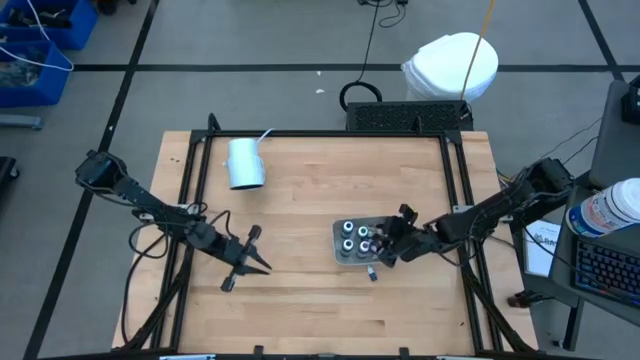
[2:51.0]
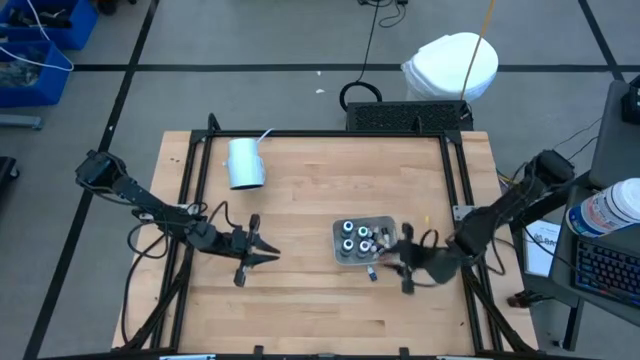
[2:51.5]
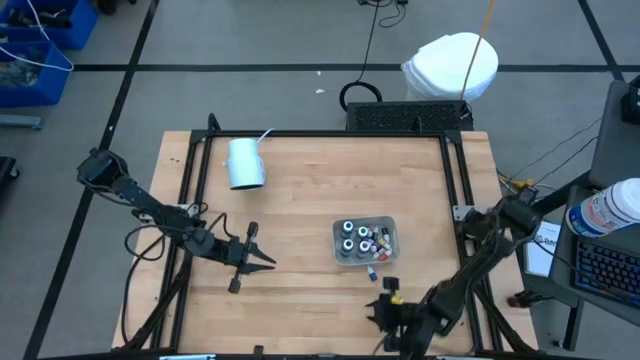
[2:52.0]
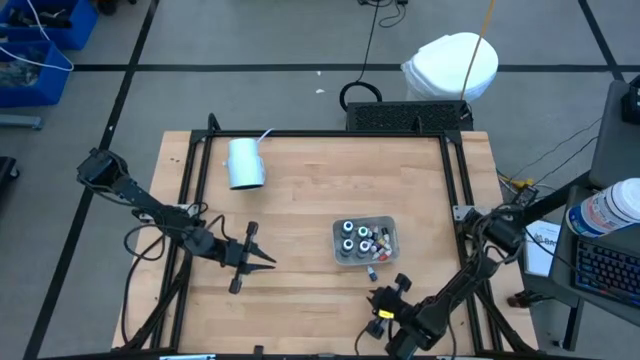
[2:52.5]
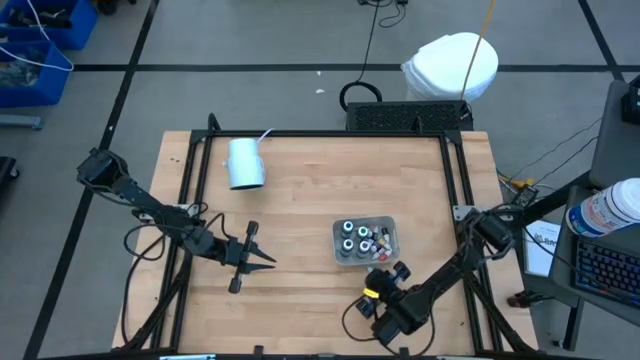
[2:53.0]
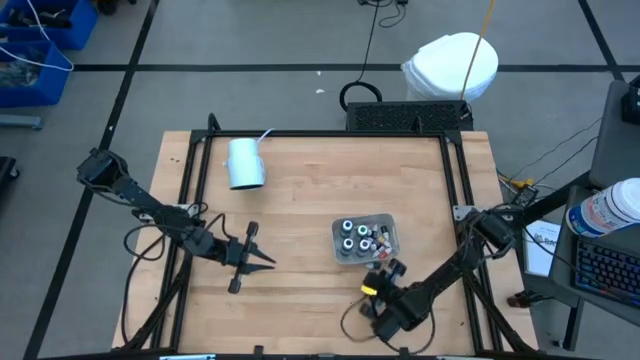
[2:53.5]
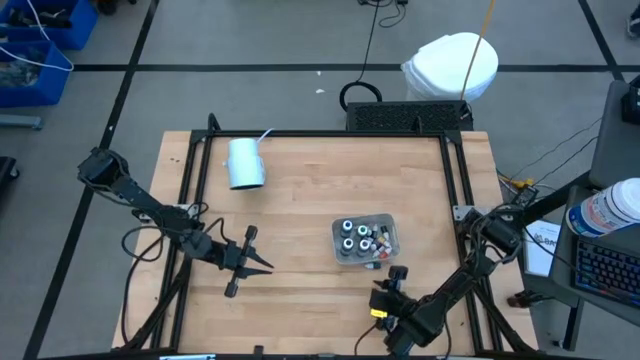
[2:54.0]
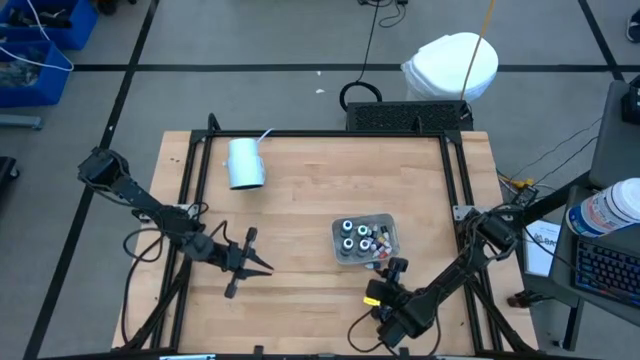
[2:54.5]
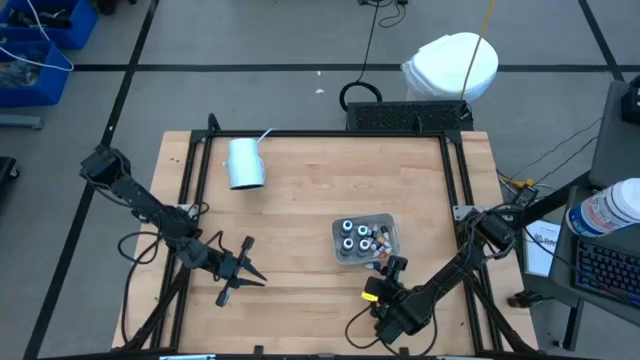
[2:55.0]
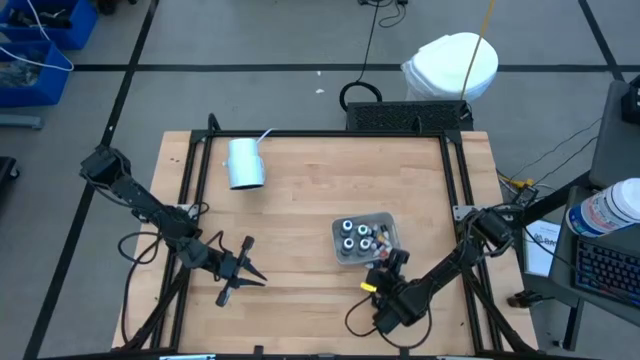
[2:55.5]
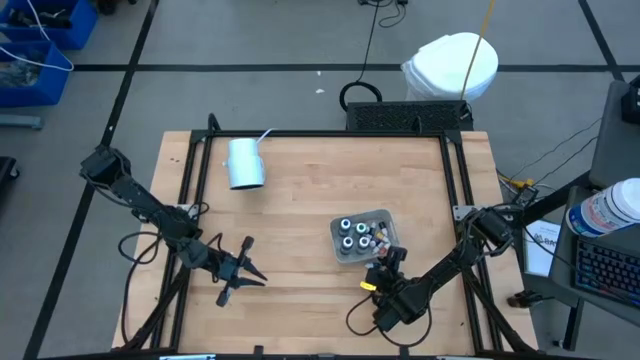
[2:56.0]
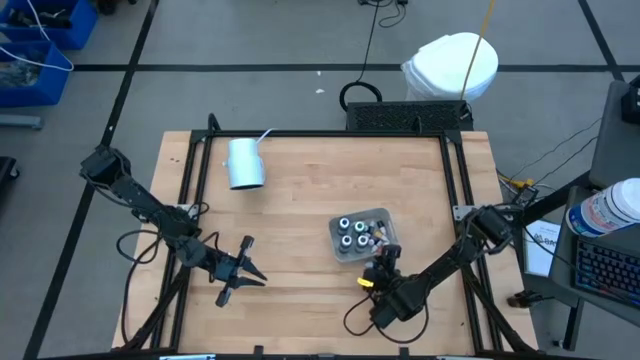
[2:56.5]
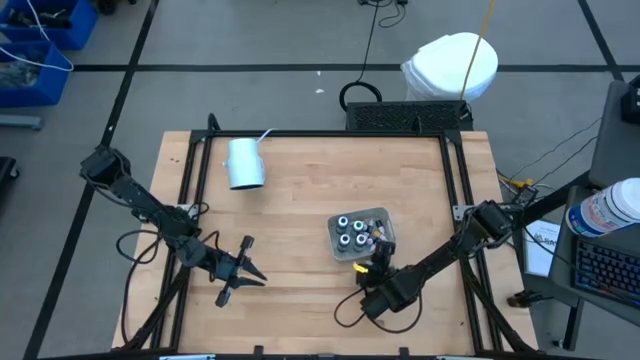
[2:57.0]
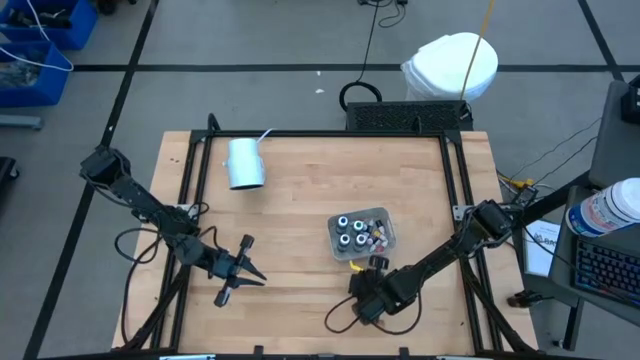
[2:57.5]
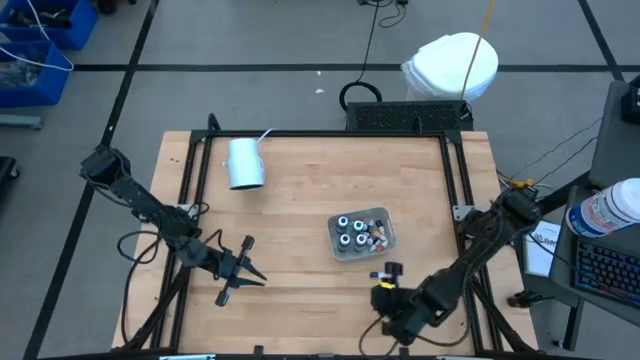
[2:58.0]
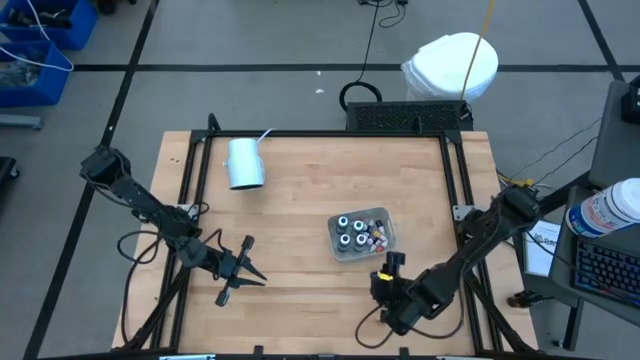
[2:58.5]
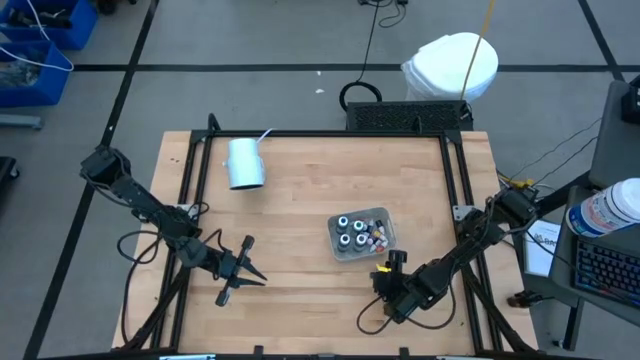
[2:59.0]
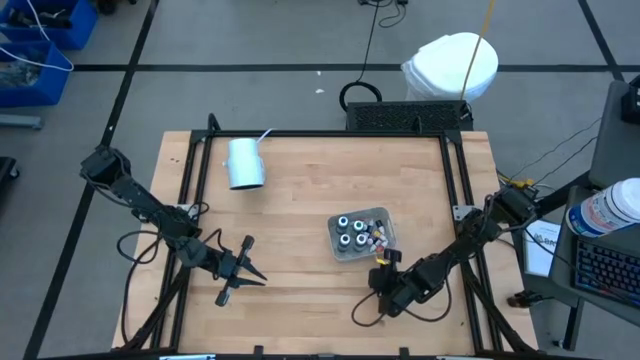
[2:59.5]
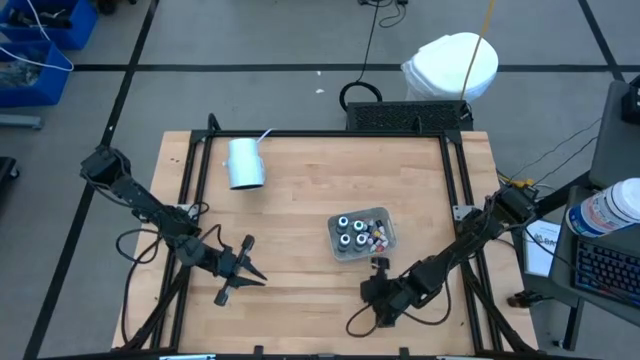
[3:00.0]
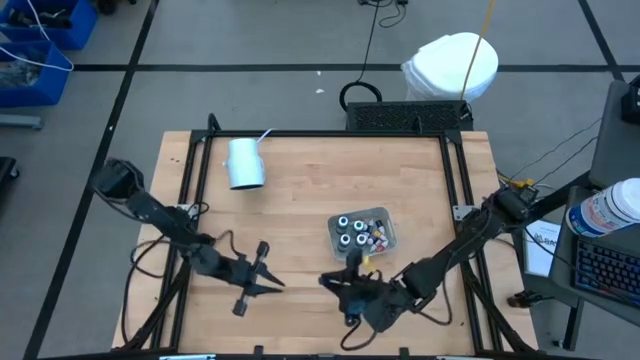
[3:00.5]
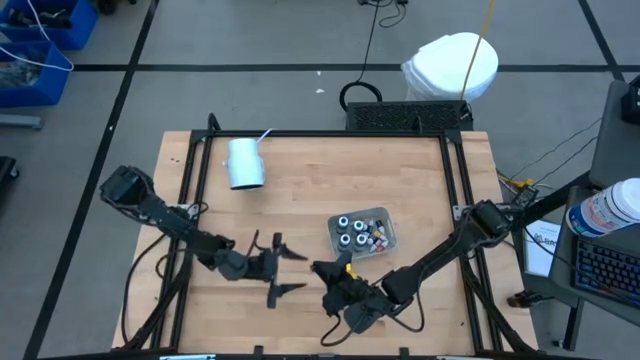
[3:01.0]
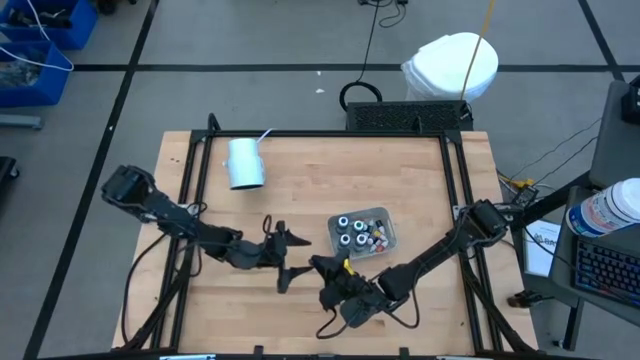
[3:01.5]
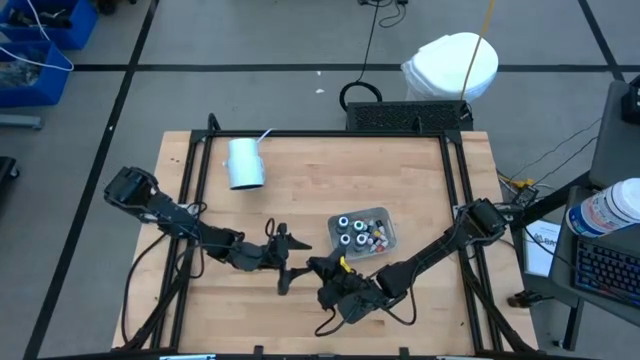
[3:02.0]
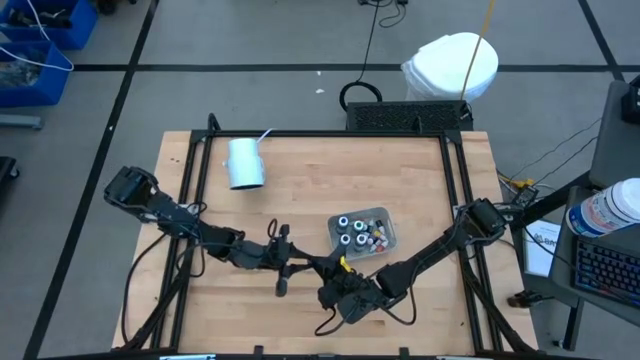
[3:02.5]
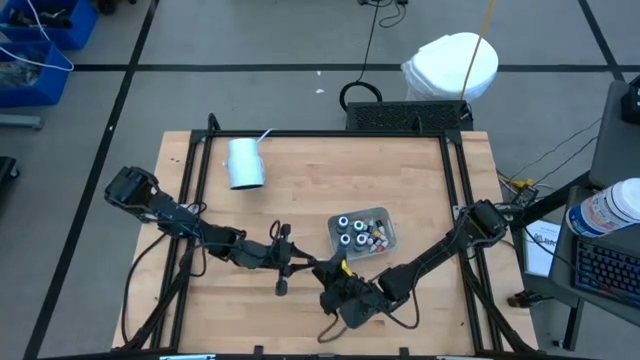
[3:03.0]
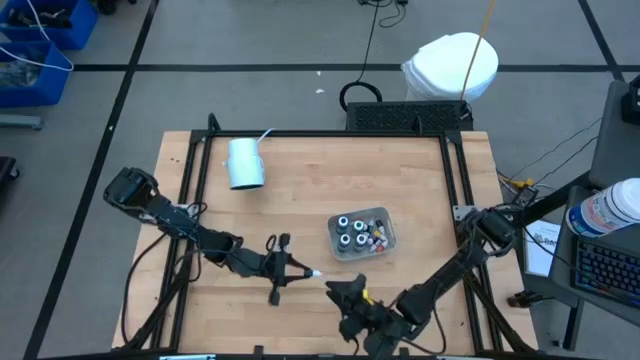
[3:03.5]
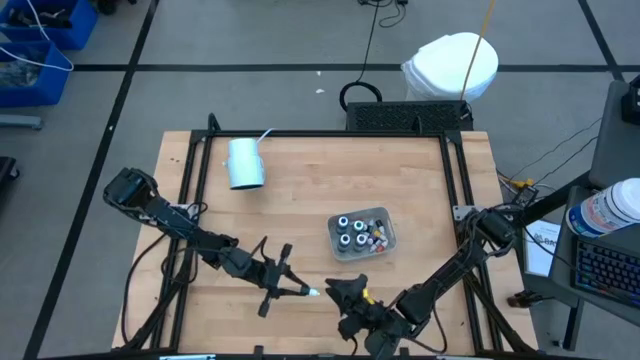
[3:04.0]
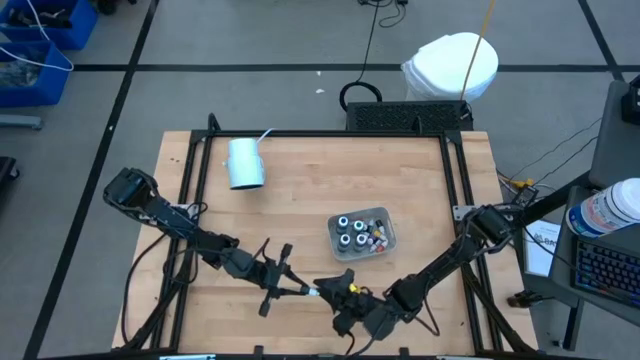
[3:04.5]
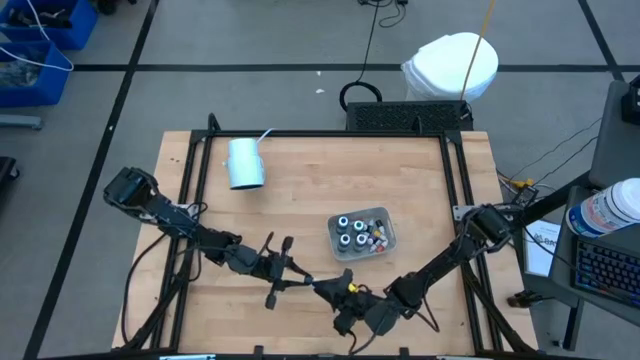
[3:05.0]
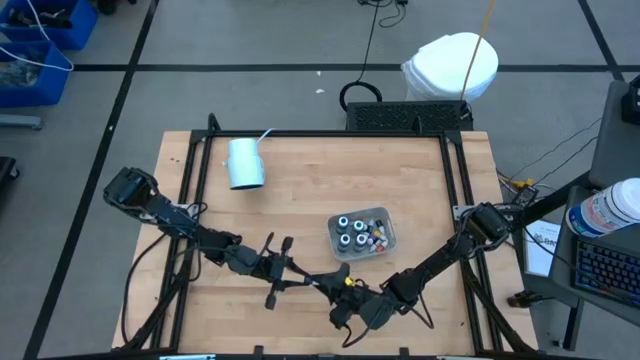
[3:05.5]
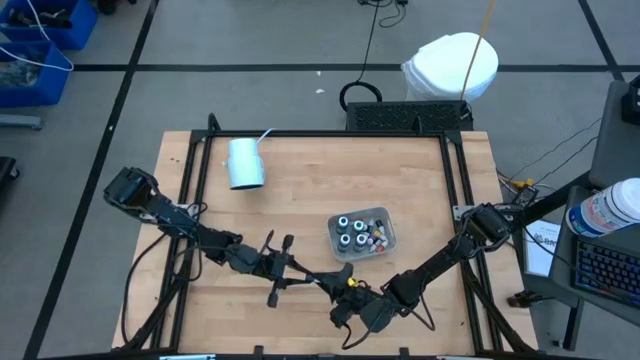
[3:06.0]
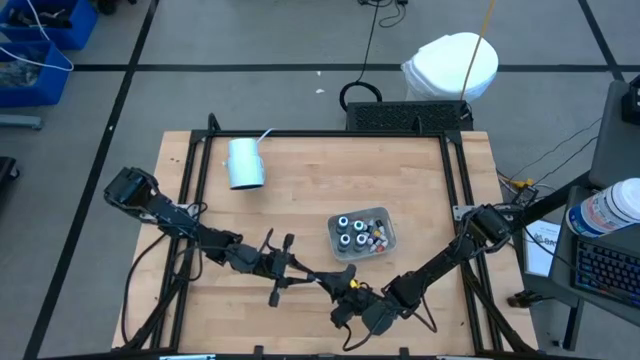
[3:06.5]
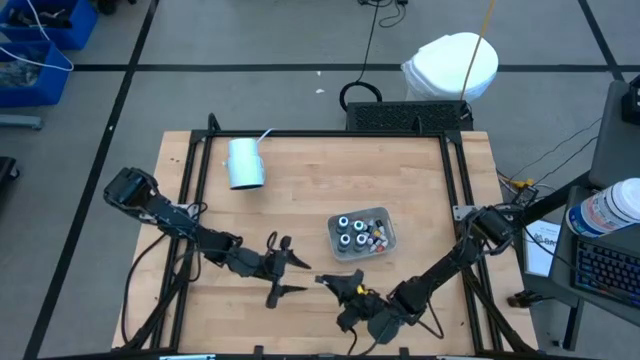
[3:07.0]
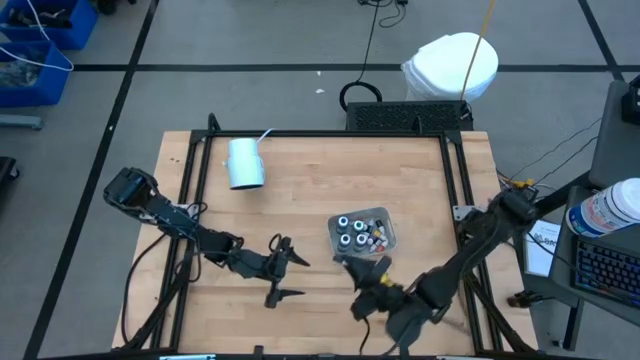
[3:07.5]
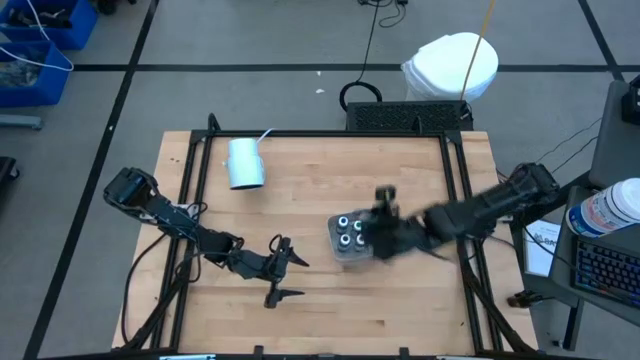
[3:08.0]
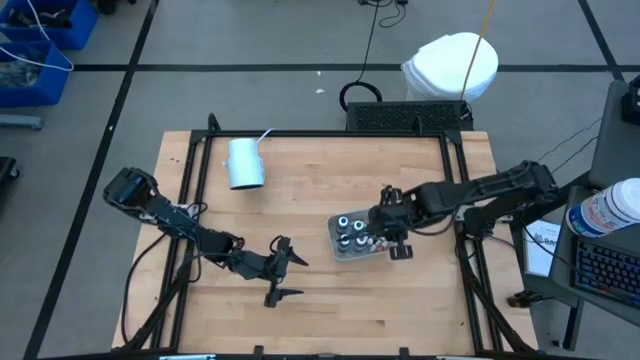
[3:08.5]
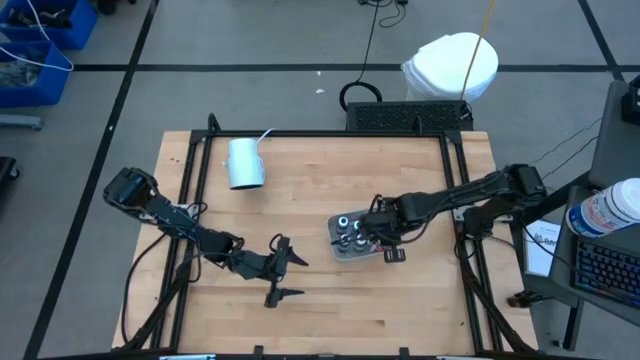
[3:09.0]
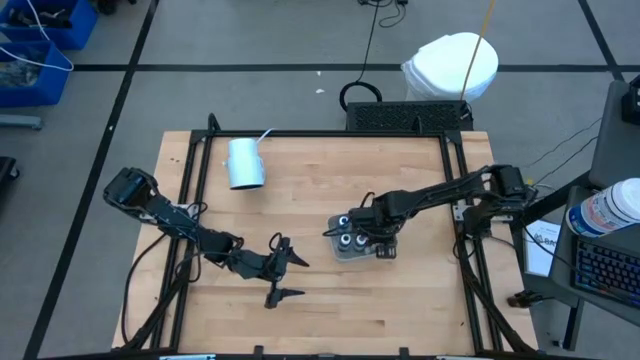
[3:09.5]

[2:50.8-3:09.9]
Task: Pick & Place food coloring
Put the small blue food coloring bottle into the gray bin

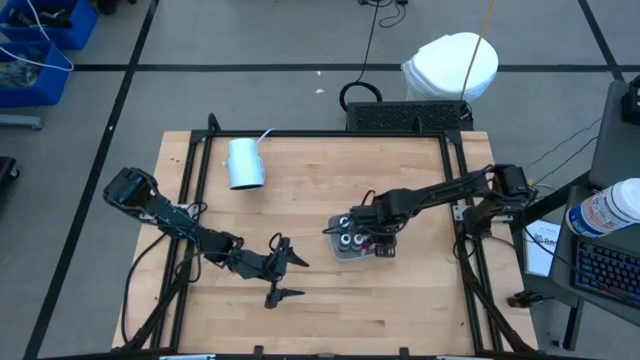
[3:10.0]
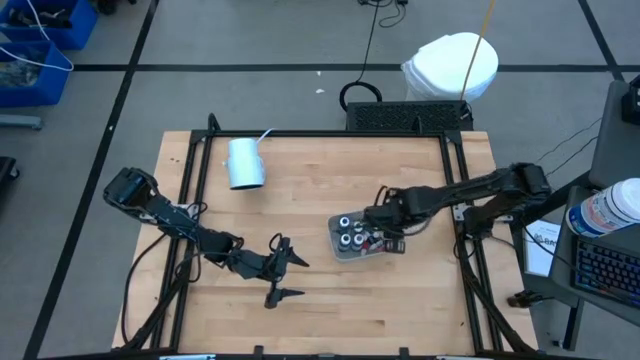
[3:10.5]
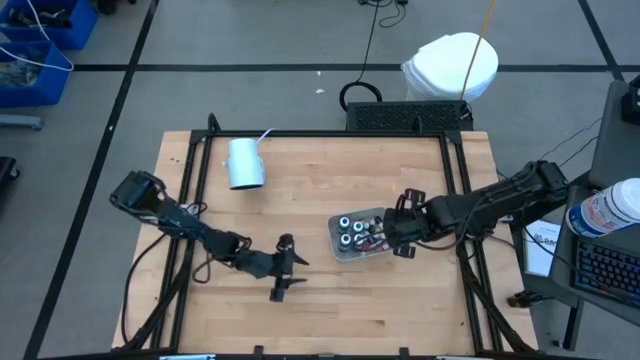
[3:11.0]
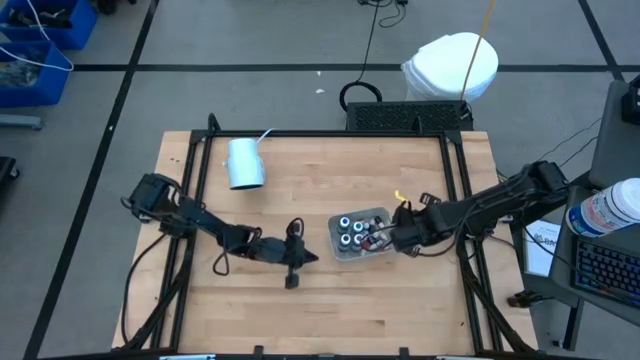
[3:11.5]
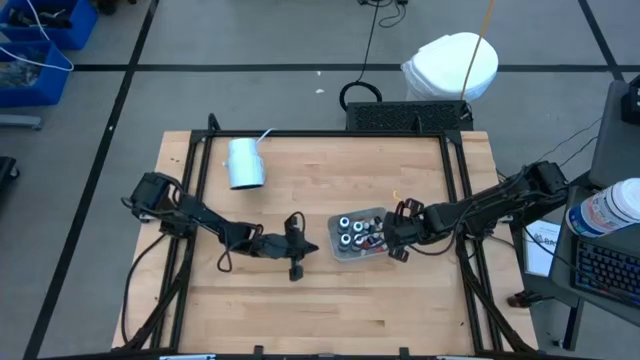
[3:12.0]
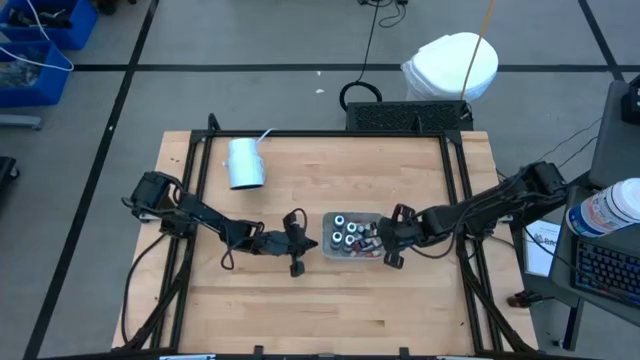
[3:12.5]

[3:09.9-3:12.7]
Adjust the gray bin on the table
